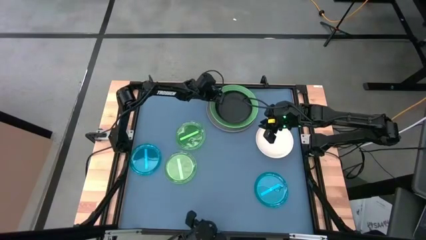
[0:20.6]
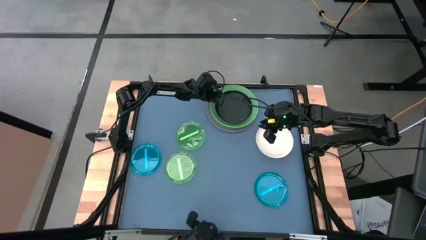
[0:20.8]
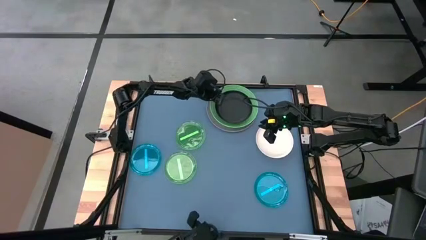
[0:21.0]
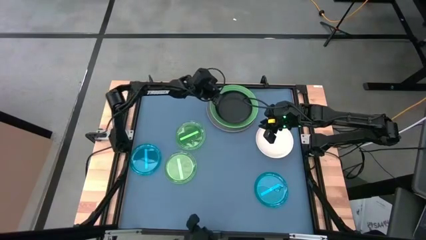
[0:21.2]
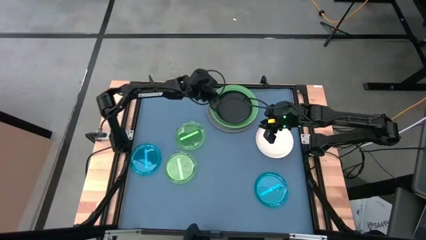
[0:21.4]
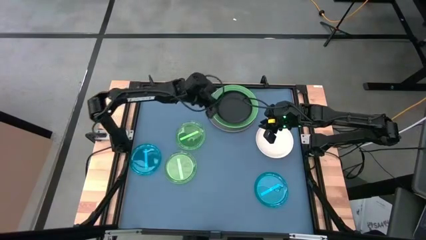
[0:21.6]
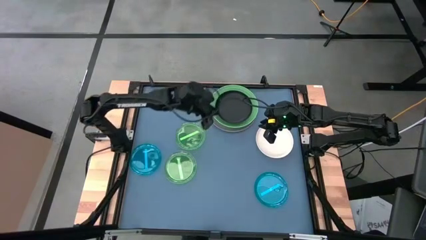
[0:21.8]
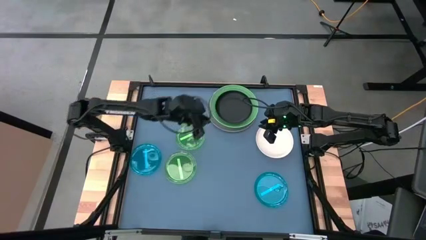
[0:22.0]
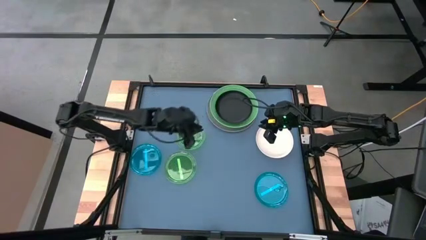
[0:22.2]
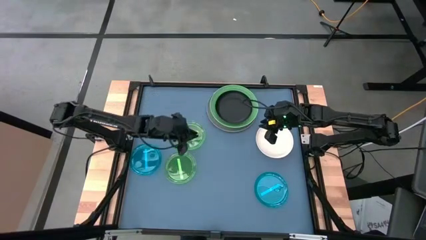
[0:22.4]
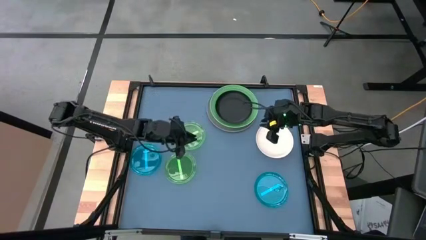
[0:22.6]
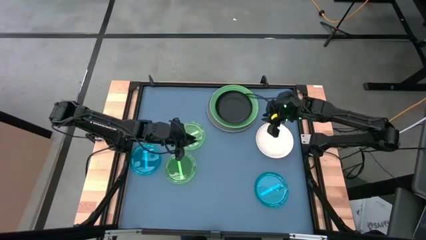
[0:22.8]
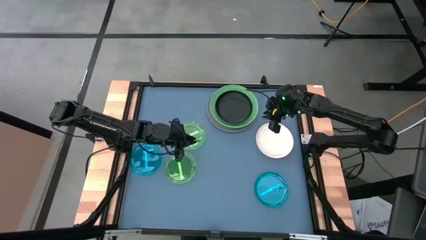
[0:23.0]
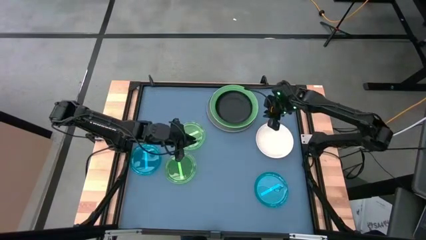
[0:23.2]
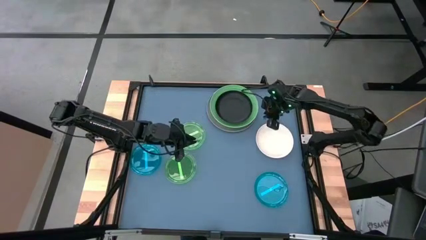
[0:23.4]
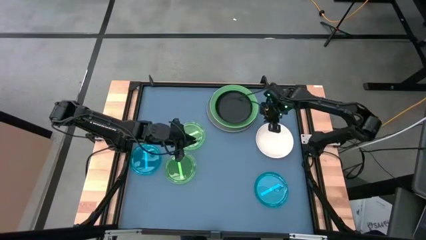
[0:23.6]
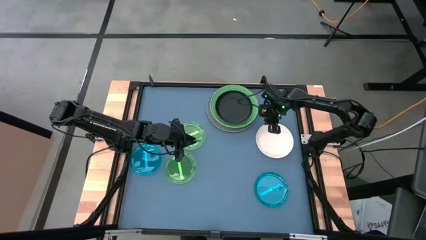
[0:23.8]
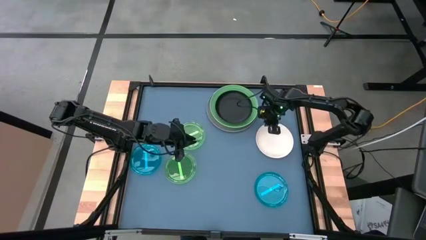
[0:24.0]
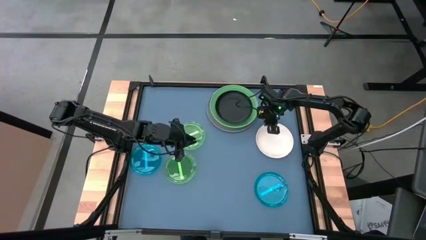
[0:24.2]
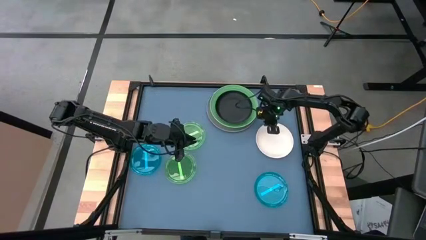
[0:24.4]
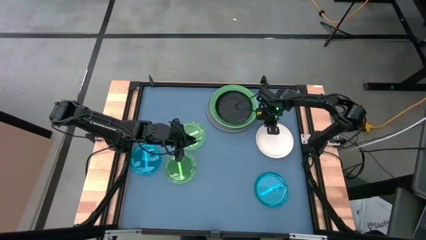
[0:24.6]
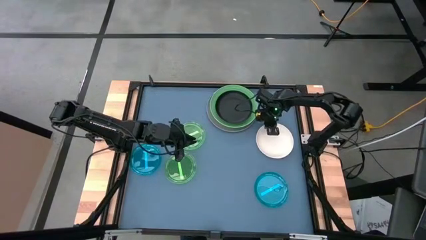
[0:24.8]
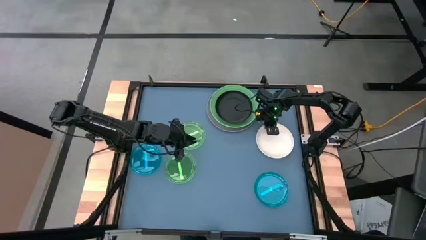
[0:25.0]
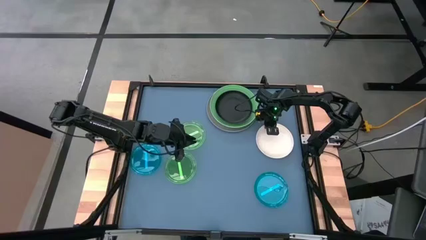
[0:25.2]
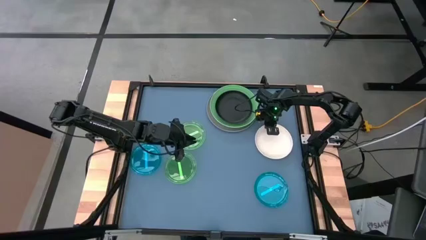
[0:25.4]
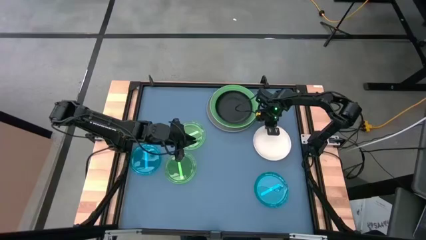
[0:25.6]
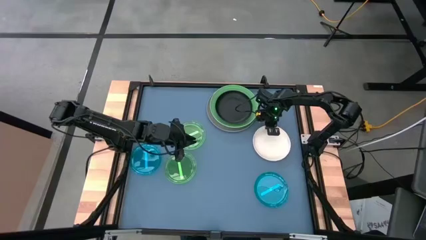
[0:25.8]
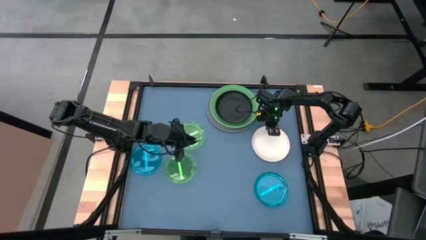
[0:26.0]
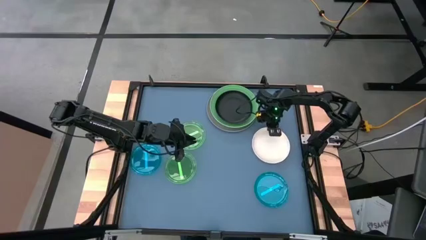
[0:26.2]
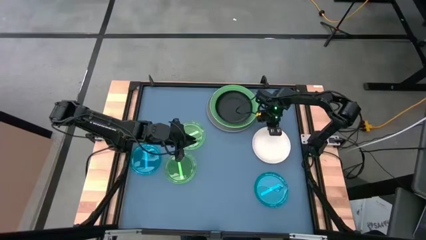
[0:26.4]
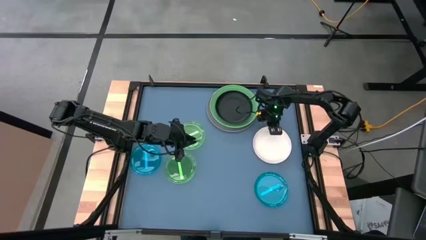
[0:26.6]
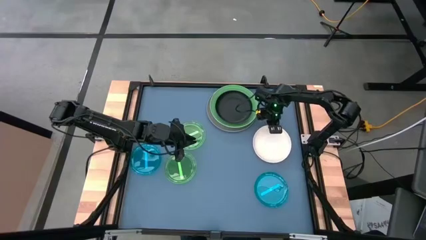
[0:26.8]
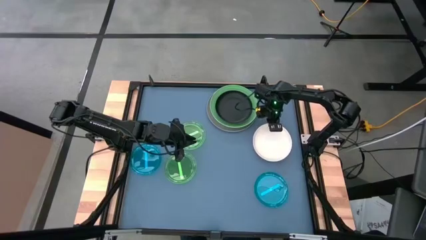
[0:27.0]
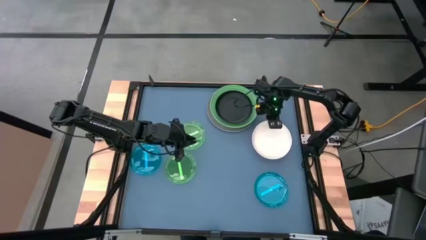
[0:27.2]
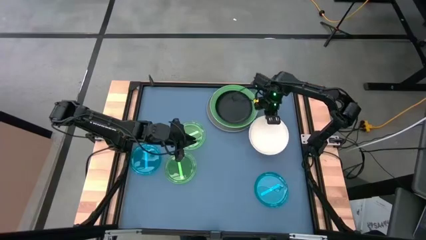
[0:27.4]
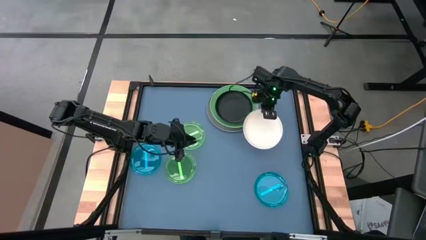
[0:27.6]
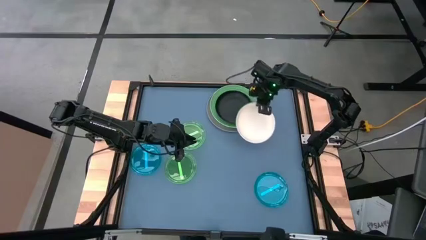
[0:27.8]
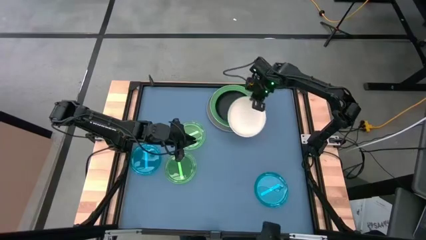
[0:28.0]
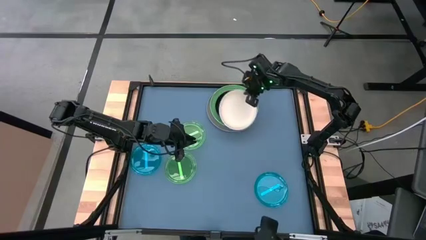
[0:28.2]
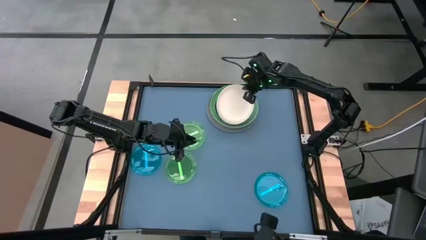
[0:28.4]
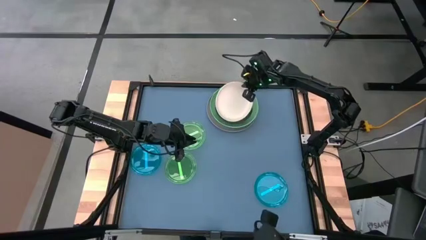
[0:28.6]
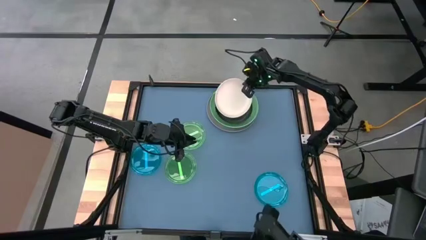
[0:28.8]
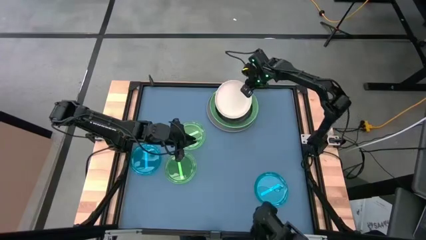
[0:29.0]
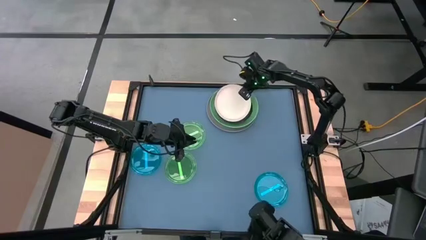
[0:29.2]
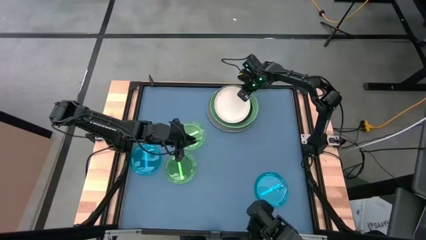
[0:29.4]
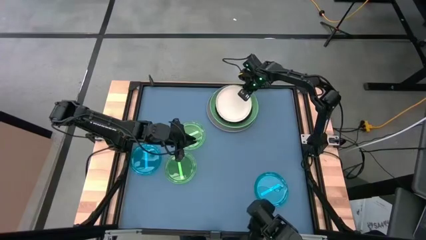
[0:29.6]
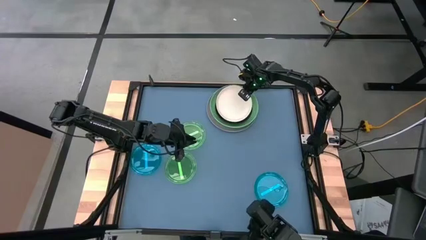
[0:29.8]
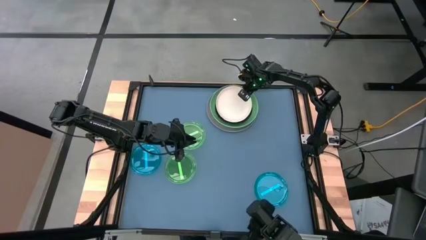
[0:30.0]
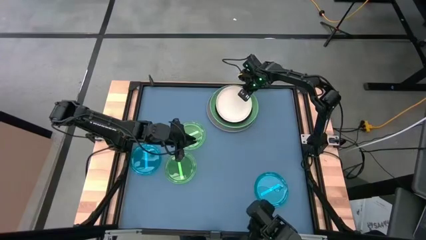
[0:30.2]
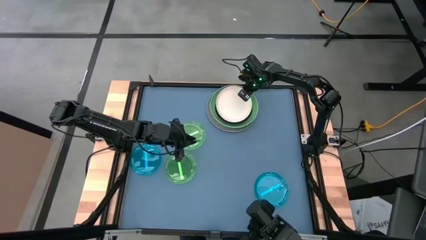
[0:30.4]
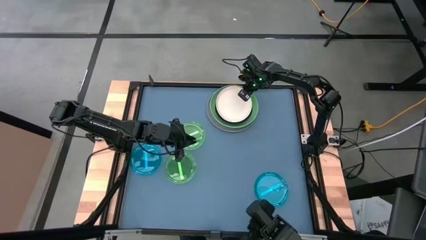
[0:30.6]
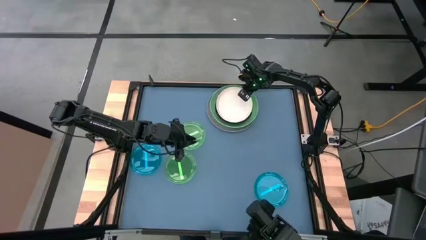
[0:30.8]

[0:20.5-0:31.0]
Task: Stack plastic plates
Stack the medium white plate on the medium black plate

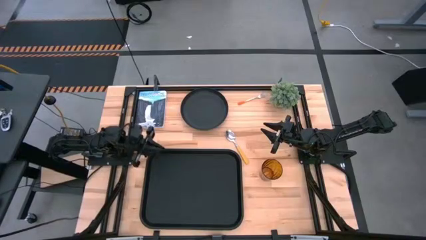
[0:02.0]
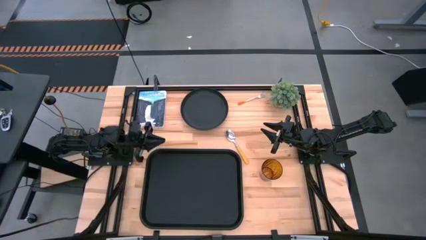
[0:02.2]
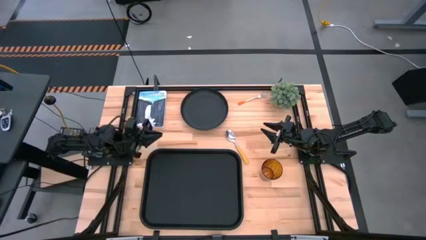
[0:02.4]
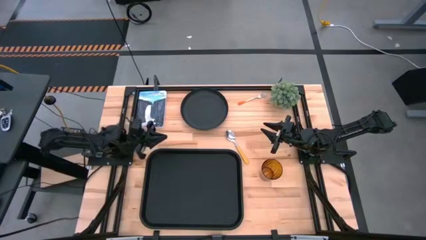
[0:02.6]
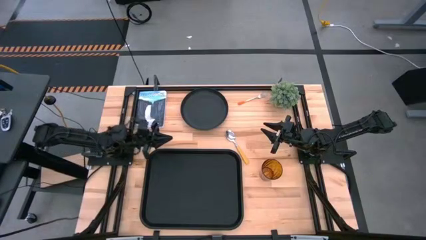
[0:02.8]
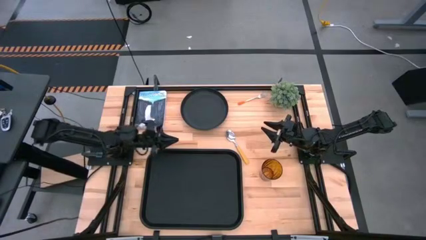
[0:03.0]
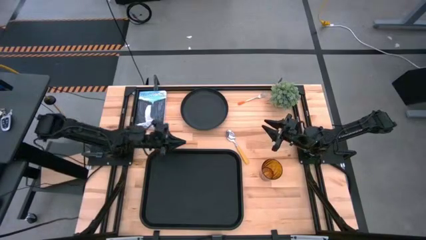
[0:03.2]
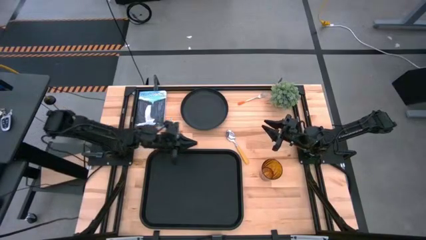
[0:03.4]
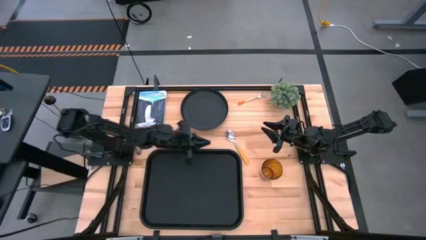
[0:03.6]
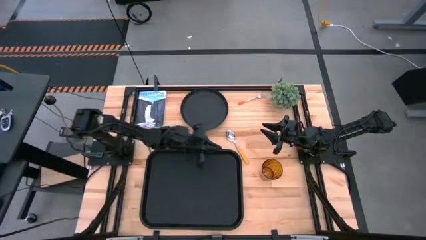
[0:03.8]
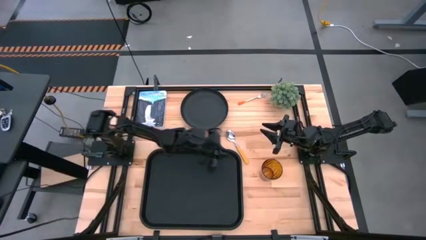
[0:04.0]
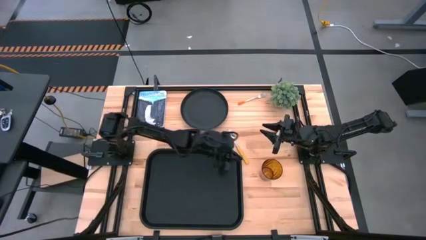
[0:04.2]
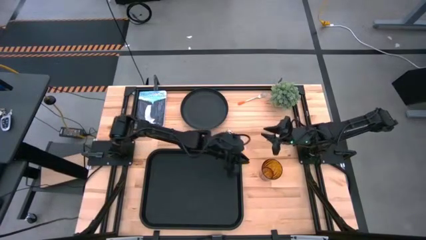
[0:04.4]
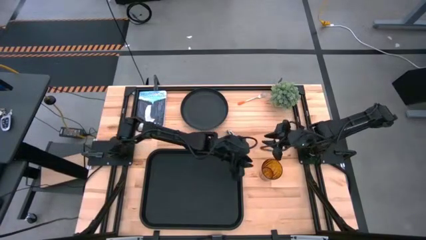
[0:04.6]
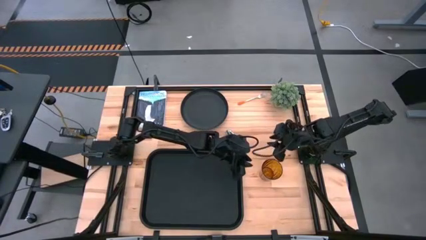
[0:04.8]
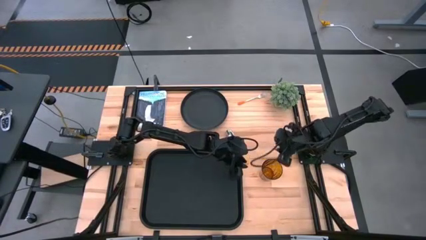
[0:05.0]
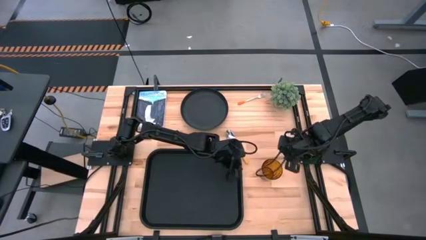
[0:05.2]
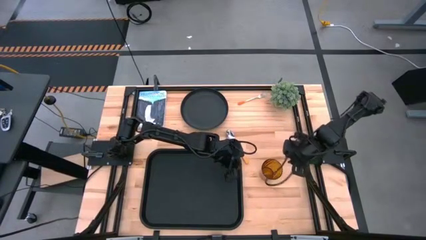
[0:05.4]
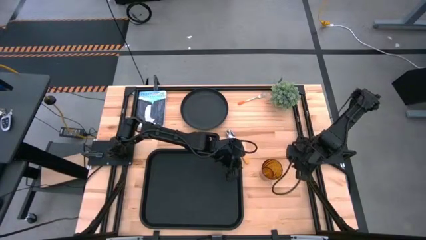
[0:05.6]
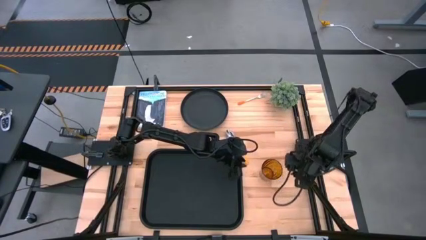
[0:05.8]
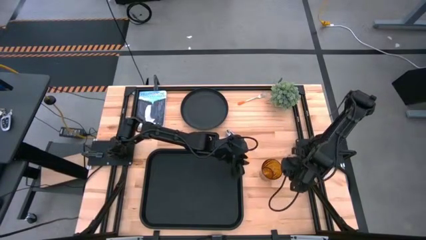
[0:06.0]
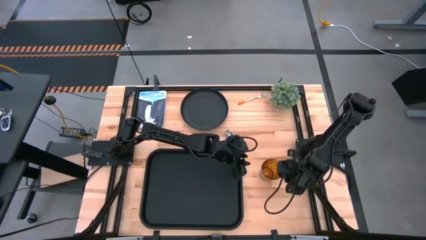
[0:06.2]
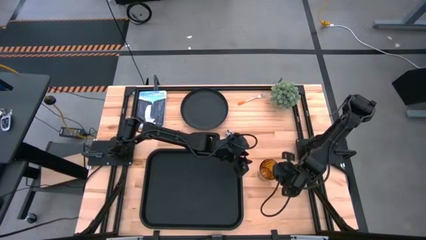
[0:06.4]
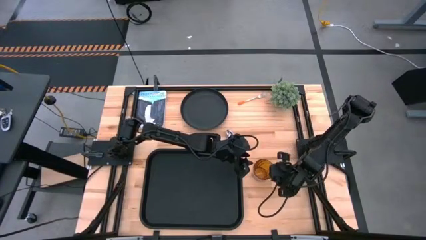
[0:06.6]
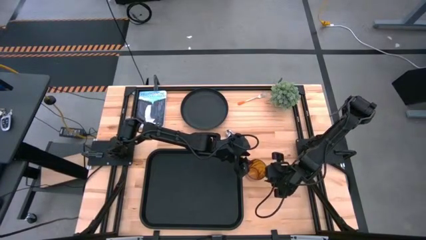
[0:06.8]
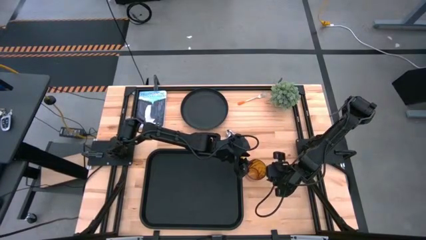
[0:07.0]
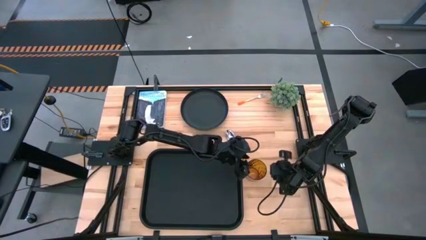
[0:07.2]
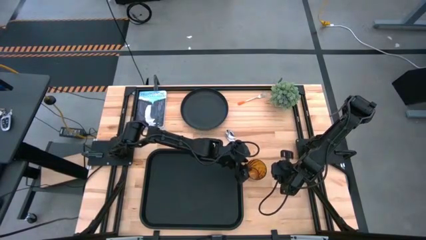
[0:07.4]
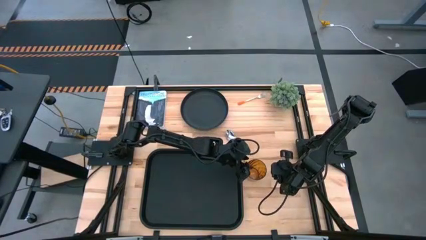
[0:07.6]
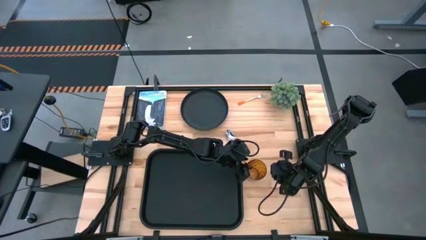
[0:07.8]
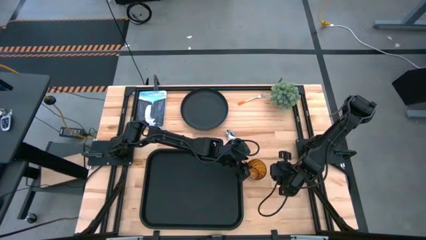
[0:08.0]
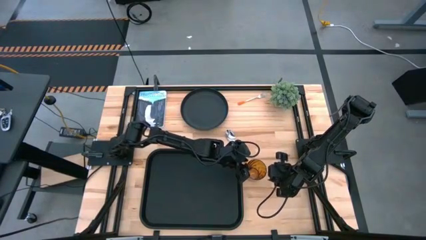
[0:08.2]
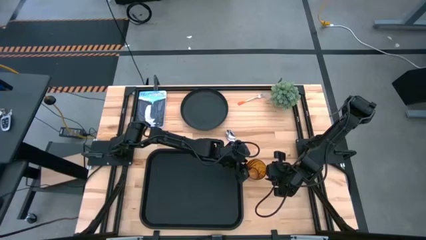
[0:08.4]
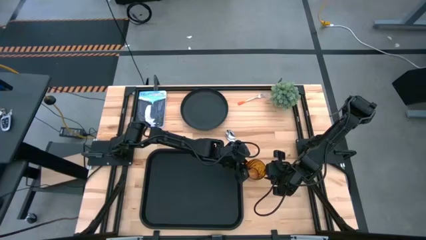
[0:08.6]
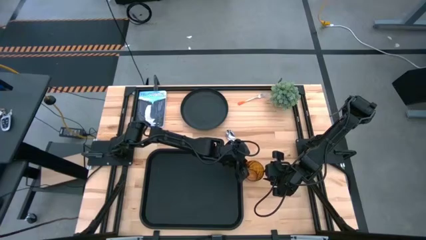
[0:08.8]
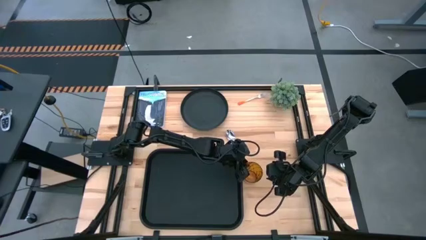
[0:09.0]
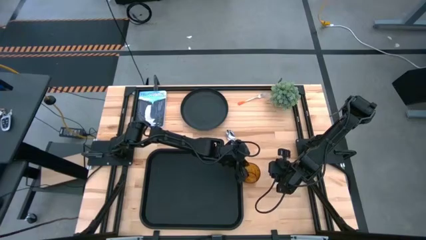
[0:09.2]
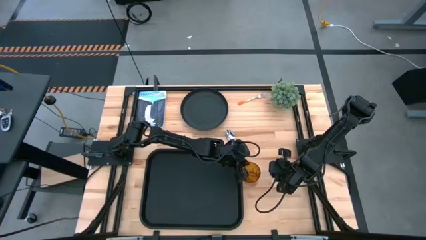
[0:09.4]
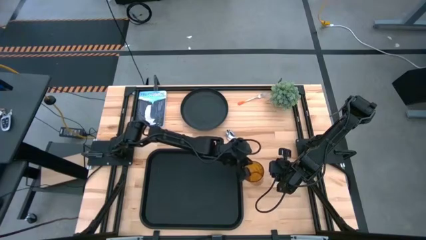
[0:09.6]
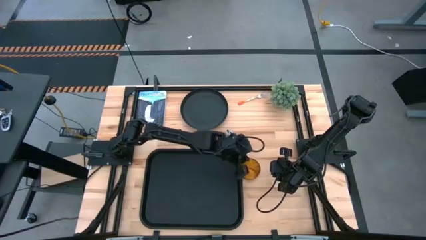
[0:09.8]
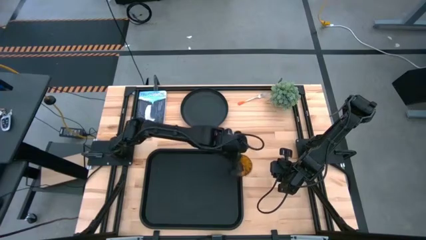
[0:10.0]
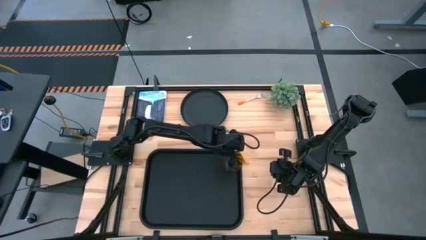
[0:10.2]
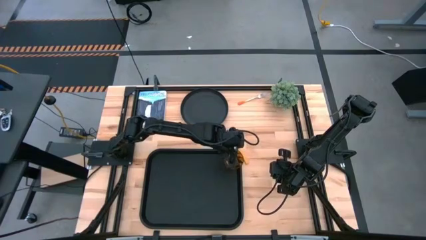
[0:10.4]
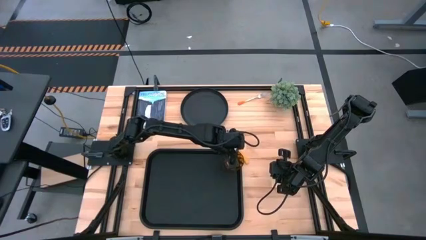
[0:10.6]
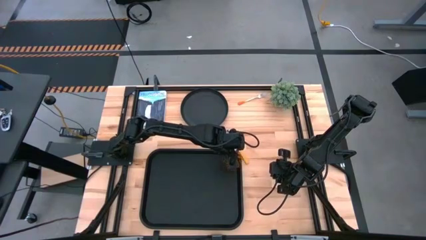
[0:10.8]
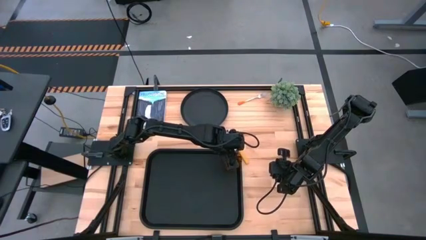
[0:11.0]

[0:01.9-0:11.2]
Task: Pick and place plate/cup/fork/spoon on tray
Put the brown cup on the black tray
